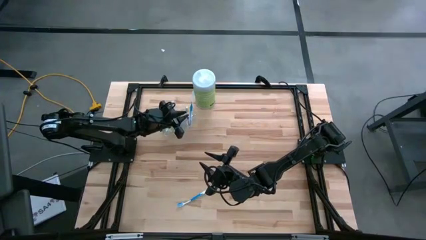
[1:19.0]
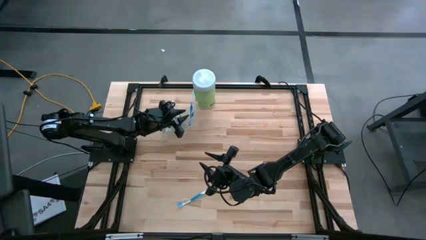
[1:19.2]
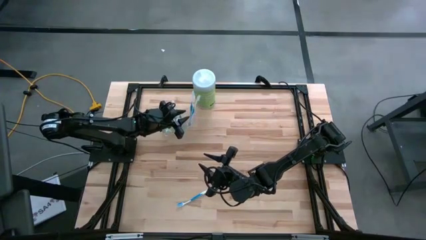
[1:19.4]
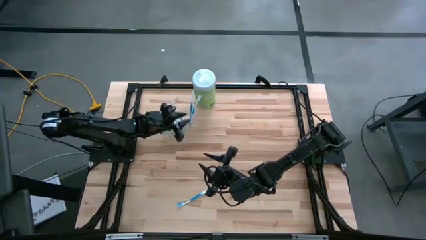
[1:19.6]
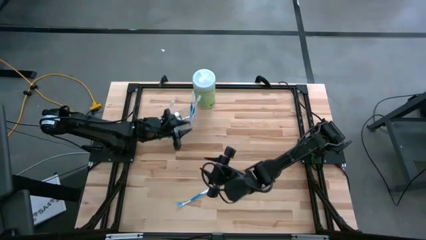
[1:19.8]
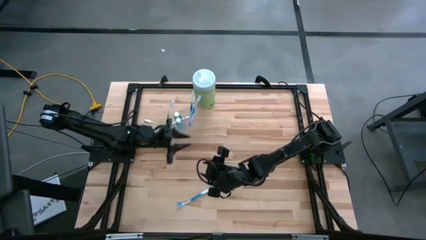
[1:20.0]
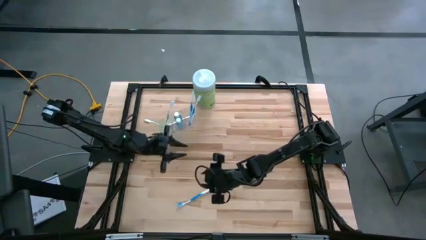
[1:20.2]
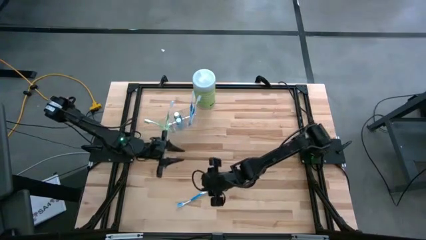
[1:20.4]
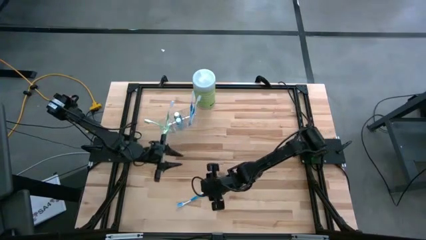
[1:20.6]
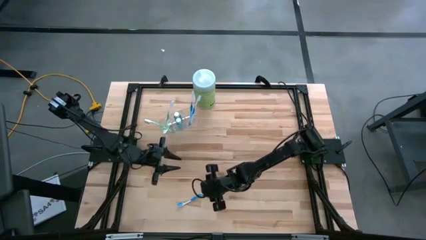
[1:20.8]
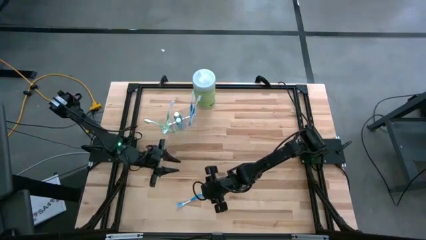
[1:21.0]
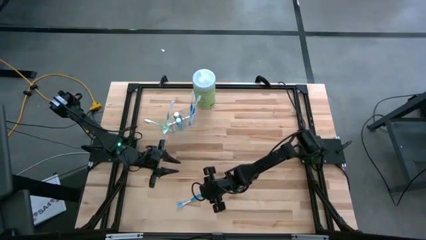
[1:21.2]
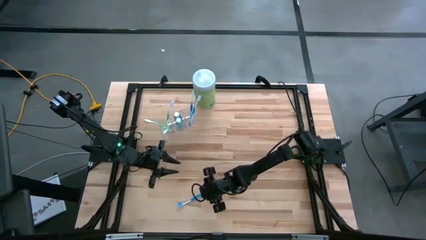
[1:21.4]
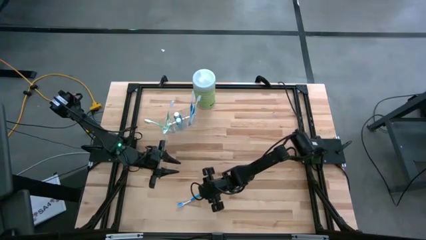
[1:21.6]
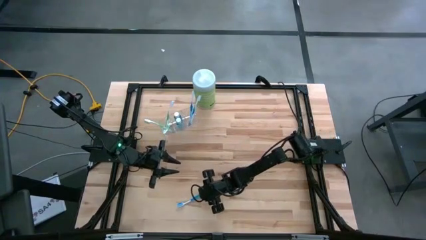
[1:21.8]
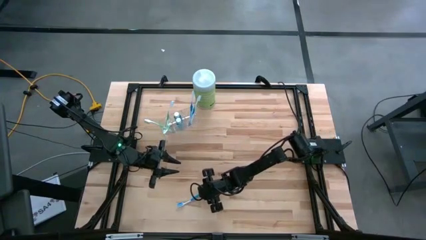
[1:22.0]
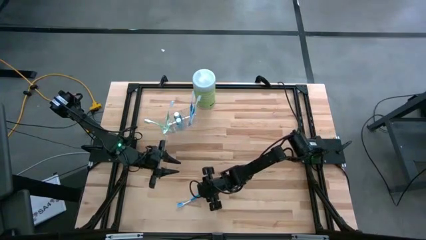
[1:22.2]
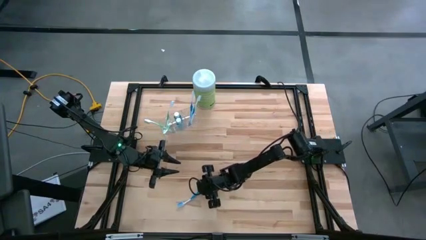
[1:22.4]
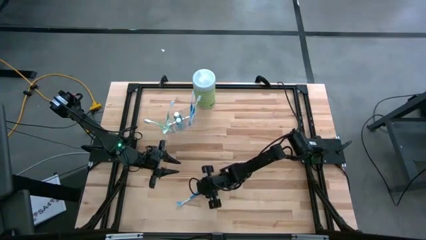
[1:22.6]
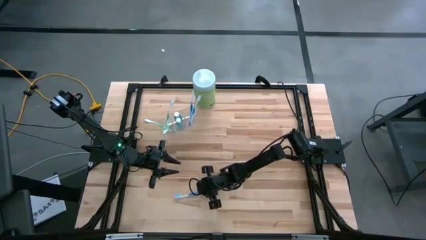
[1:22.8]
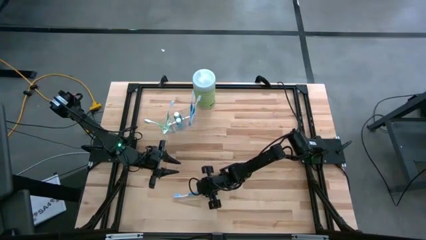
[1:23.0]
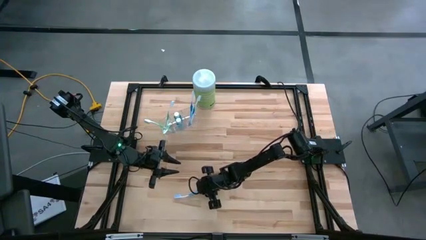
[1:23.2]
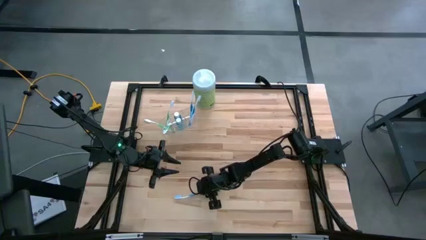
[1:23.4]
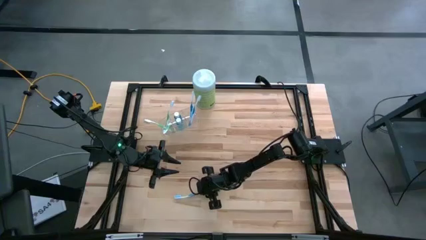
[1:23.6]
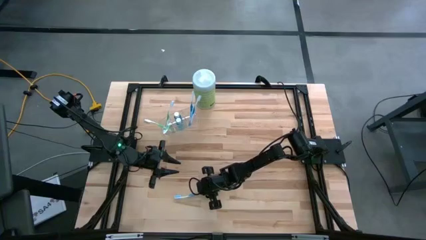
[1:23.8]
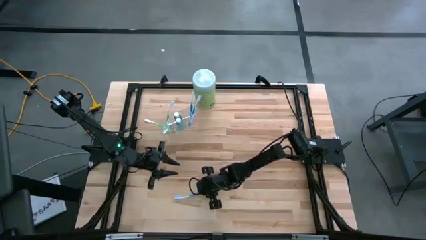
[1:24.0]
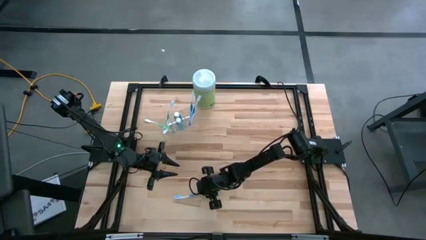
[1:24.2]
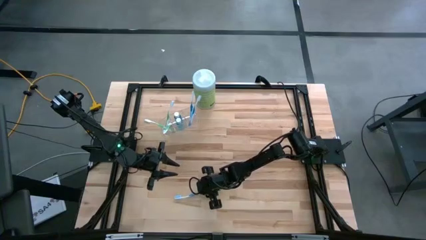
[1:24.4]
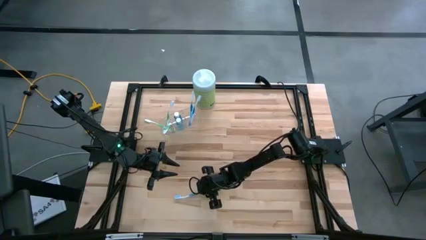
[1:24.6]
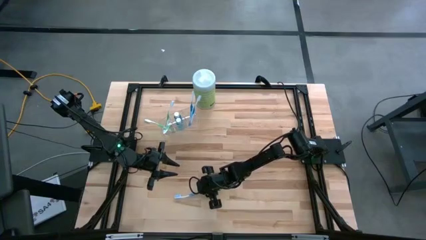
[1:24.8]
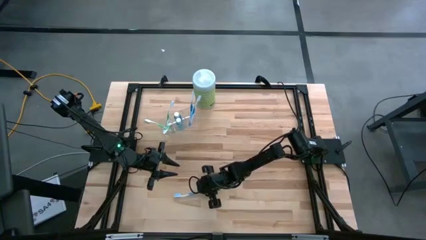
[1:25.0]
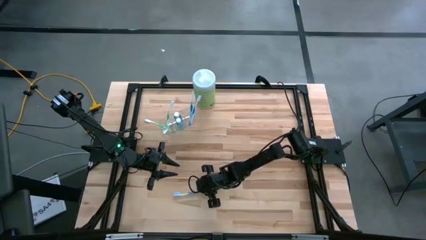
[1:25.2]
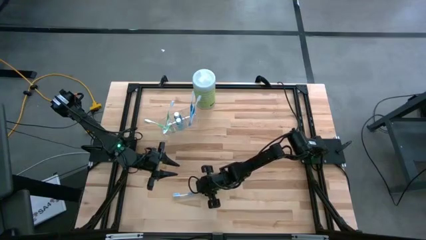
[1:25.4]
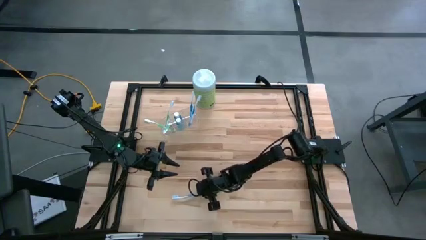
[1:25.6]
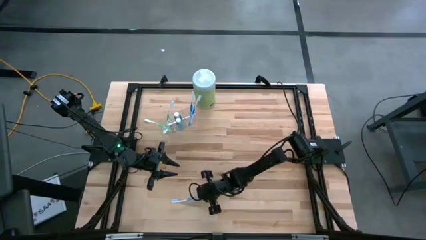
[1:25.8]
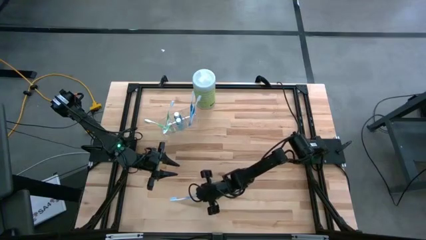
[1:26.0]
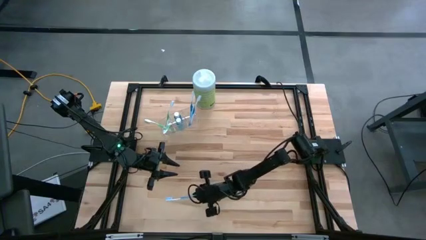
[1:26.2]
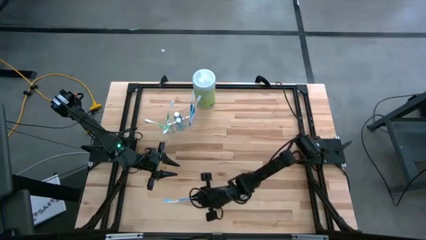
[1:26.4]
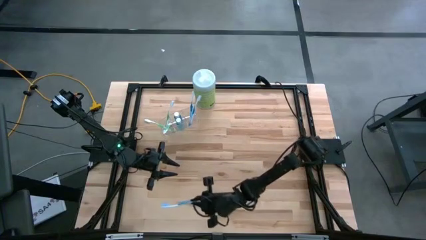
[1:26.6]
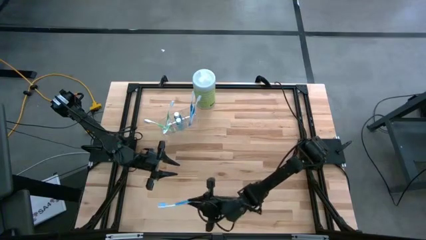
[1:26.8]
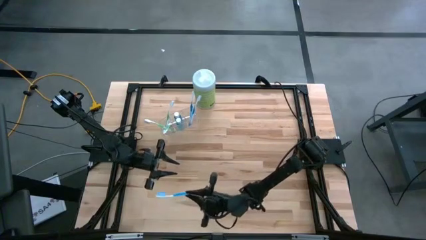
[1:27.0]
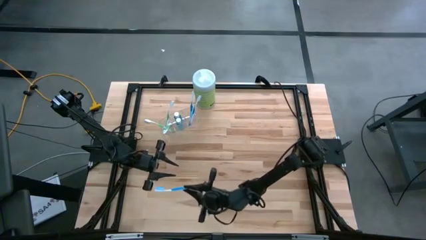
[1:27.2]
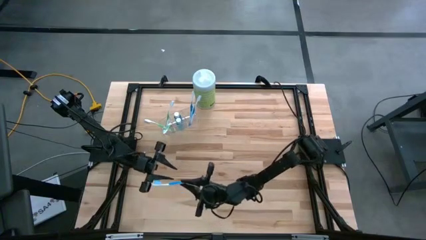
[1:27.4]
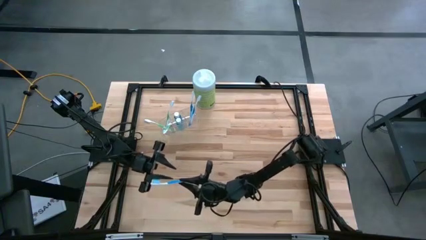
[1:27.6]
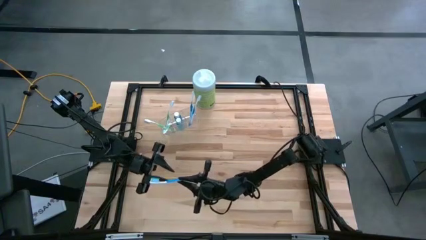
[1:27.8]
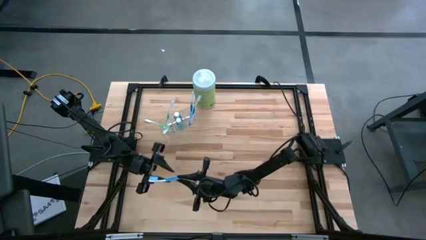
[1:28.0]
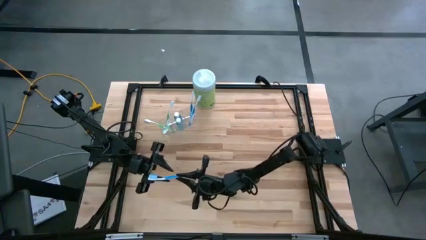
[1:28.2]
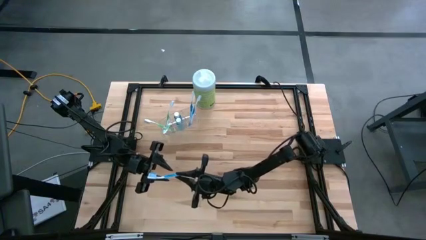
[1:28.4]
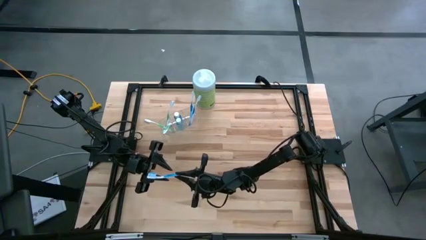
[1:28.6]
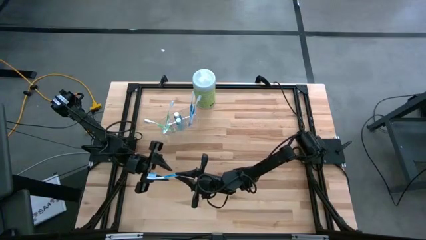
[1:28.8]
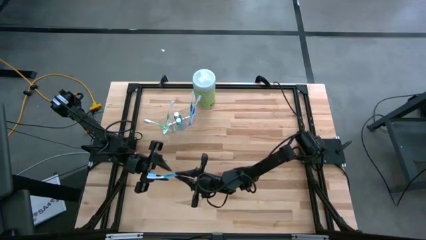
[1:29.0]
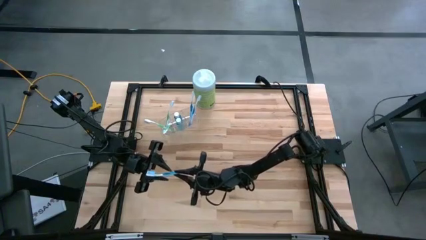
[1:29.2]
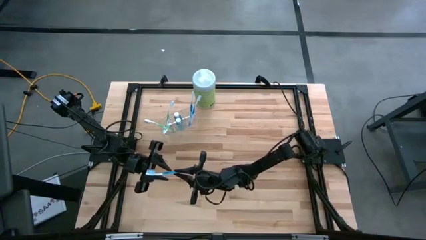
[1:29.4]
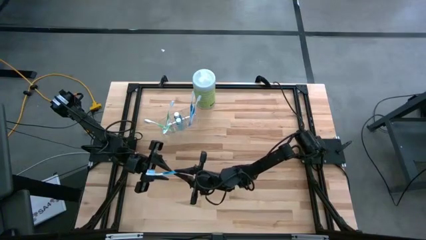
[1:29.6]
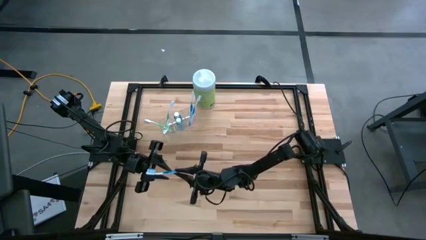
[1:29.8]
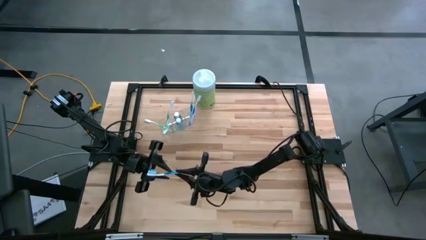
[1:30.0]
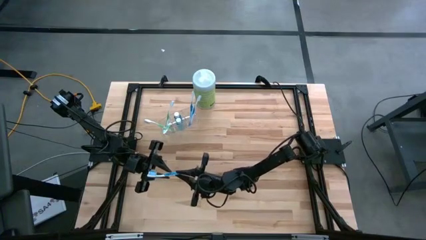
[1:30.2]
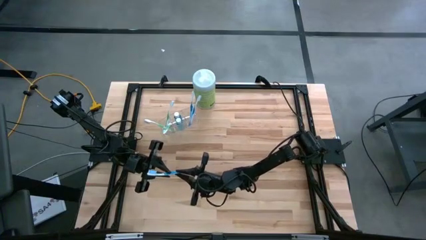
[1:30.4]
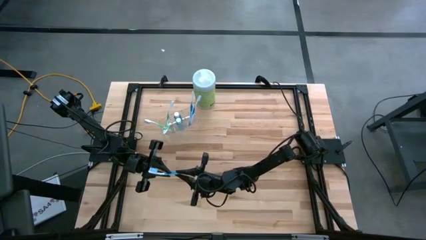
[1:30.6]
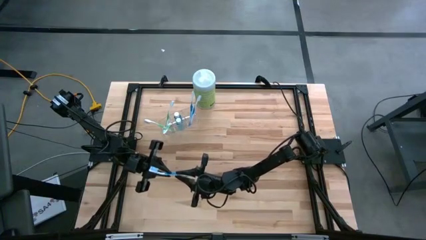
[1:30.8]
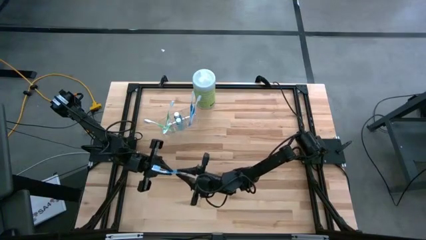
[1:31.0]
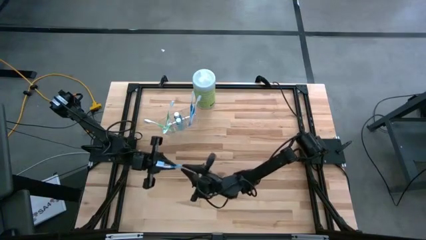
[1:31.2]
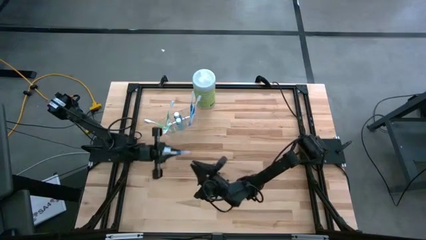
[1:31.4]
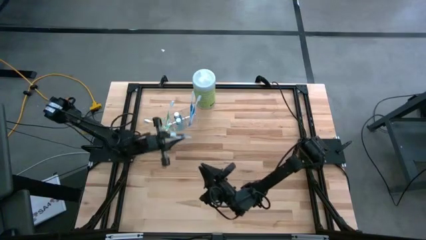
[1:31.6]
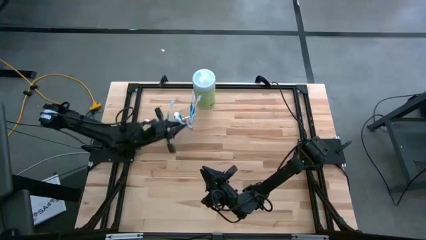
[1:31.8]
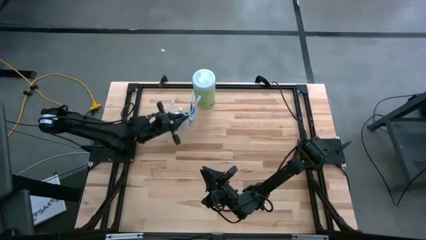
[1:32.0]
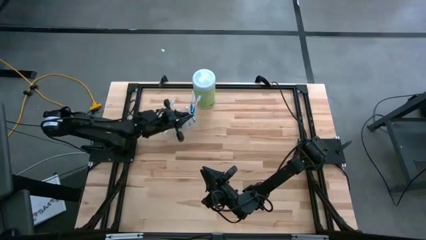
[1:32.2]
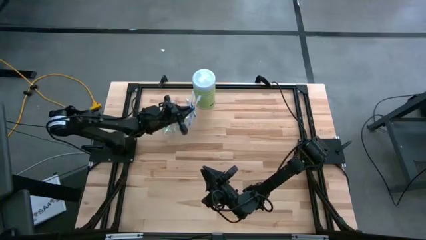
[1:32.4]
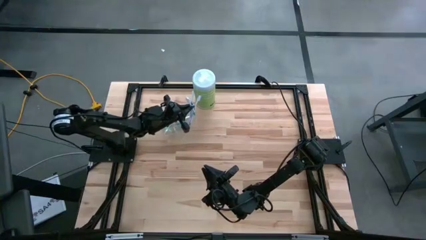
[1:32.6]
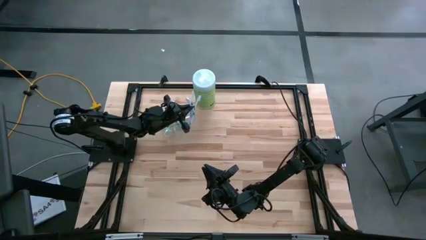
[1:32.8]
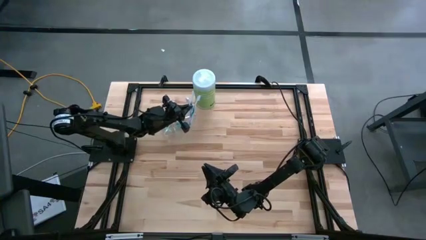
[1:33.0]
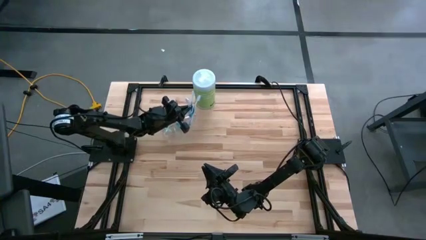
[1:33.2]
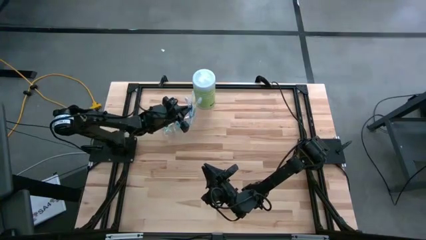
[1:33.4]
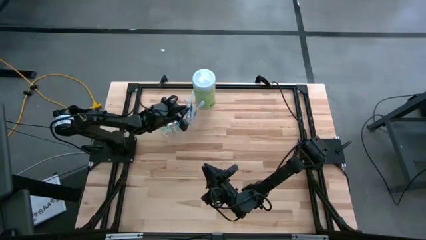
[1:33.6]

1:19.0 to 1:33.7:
Task: Pick & Place toothbrushing station
Put the blue toothbrush into the transparent organizer
